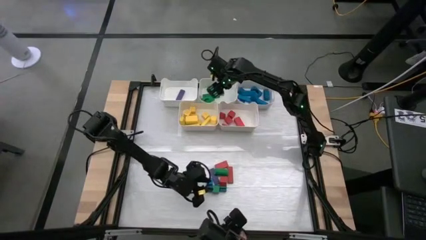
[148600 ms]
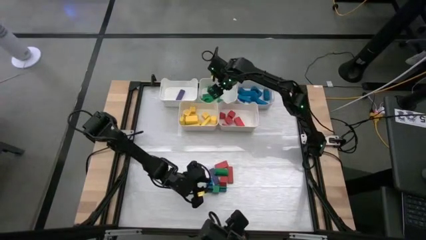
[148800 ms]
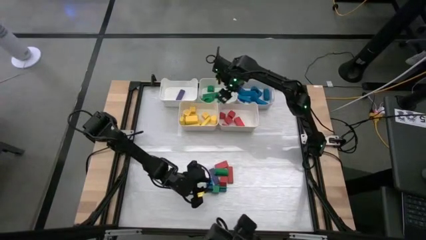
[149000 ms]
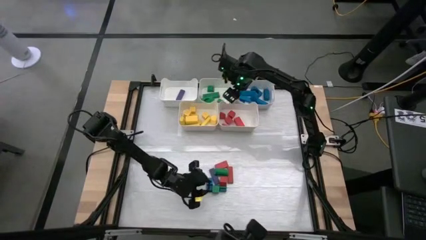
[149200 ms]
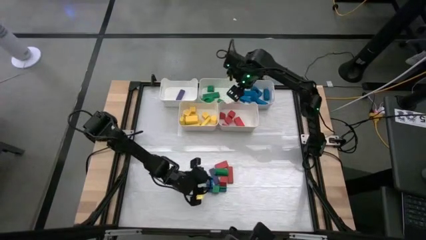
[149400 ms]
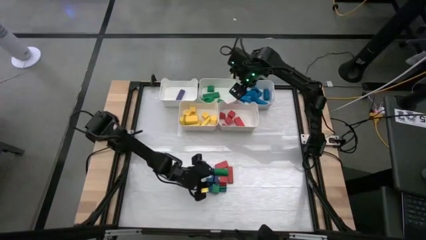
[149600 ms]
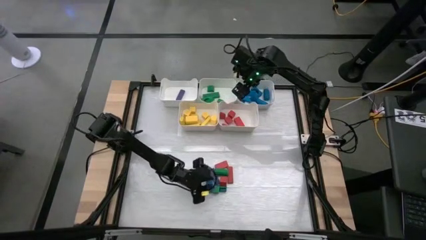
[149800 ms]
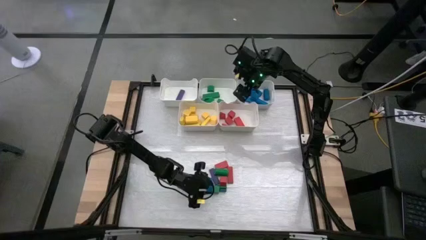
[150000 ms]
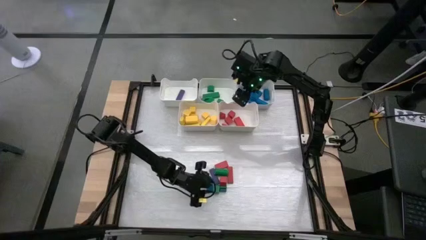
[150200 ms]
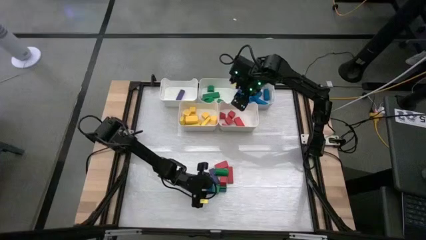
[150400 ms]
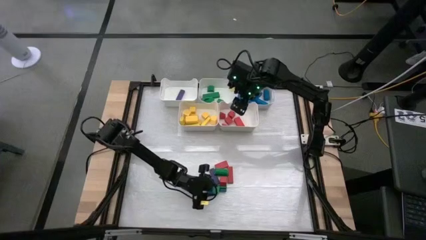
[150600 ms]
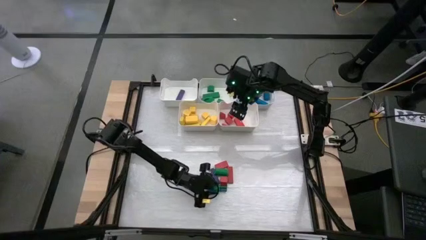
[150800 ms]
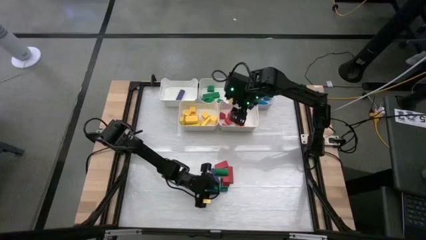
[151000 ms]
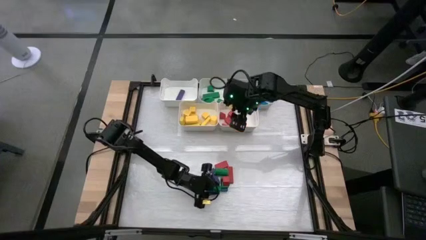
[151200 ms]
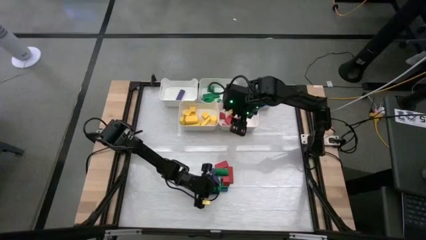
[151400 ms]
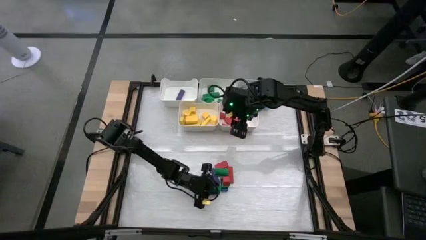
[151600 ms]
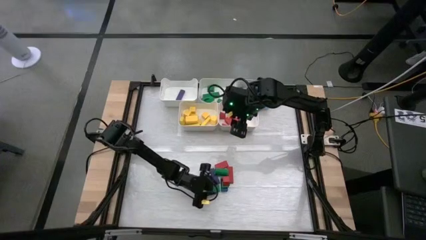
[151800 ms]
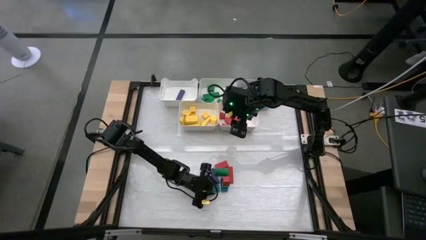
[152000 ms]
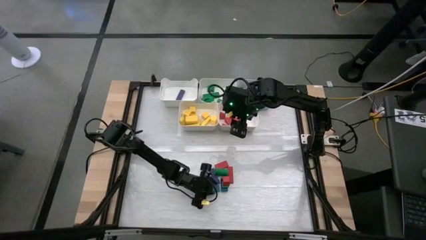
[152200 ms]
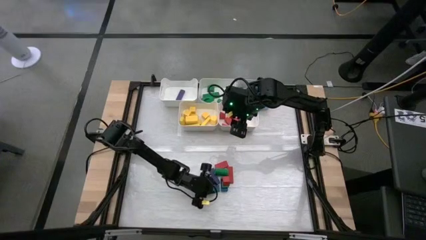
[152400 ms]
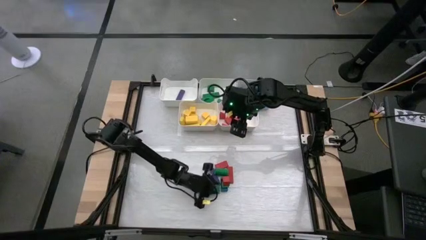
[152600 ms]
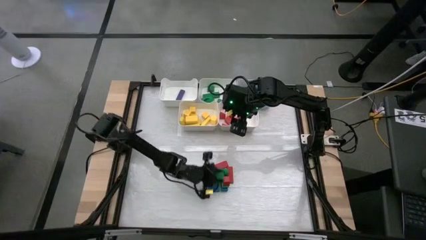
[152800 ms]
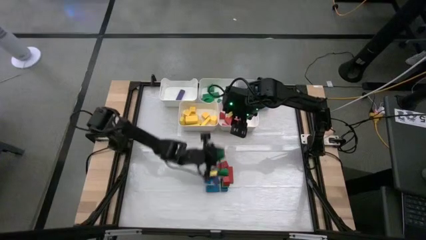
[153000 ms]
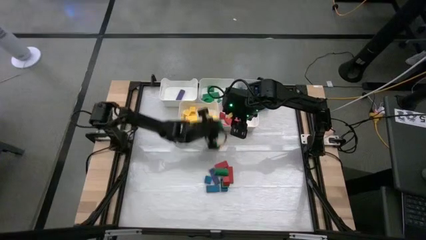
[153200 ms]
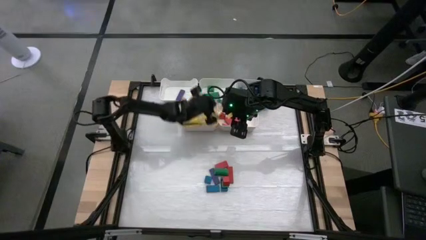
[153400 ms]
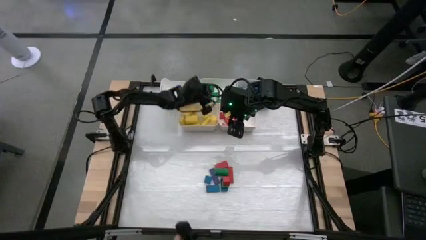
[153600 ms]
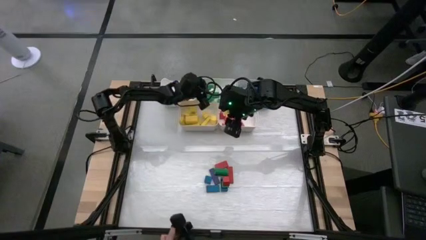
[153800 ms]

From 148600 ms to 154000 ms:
Task: Sort blocks
Put the green block into the top center bin

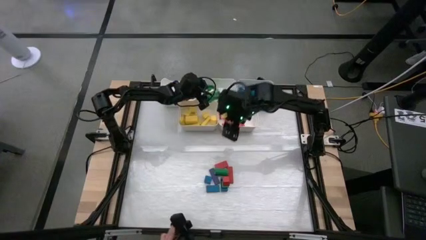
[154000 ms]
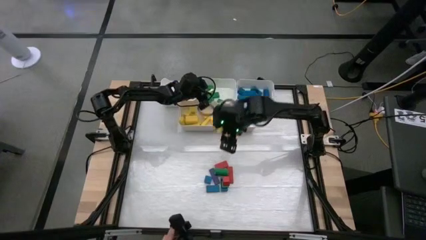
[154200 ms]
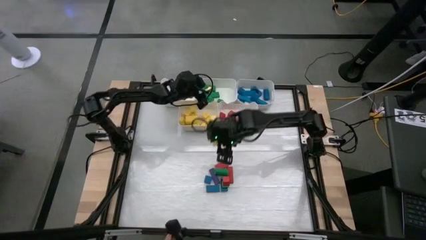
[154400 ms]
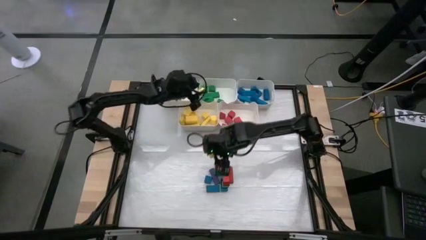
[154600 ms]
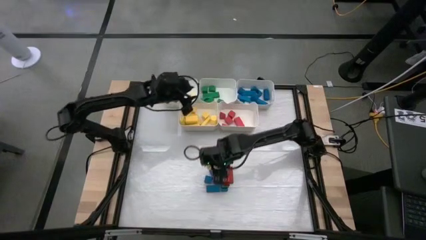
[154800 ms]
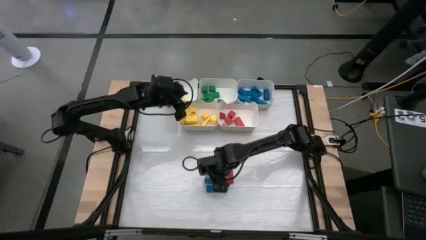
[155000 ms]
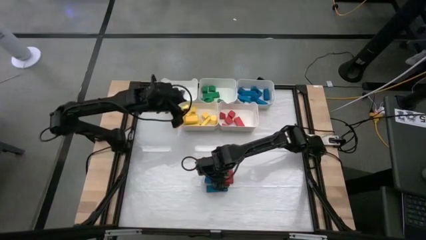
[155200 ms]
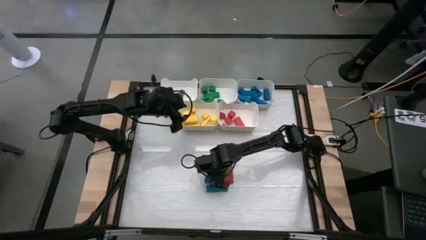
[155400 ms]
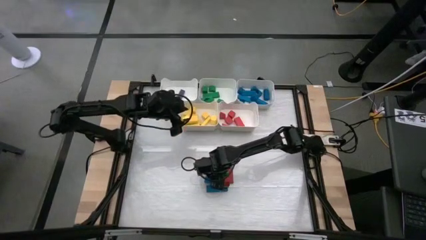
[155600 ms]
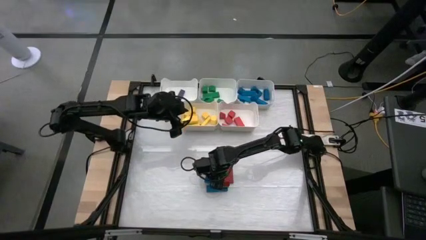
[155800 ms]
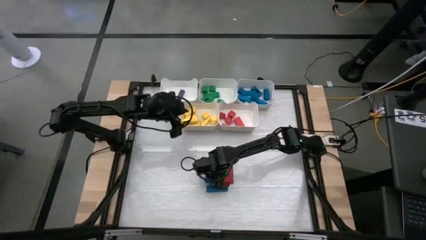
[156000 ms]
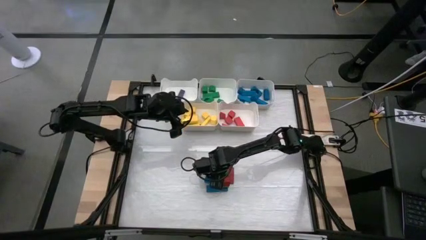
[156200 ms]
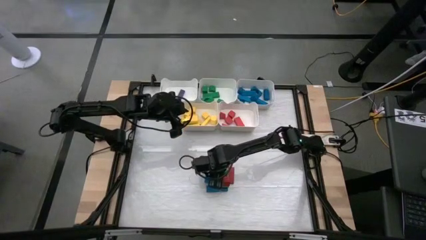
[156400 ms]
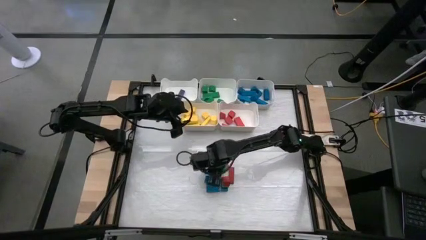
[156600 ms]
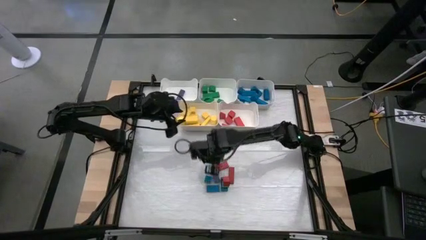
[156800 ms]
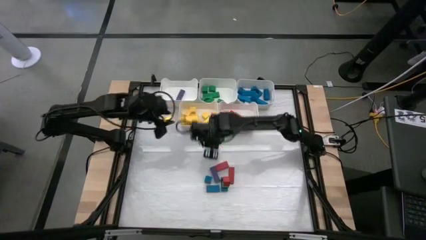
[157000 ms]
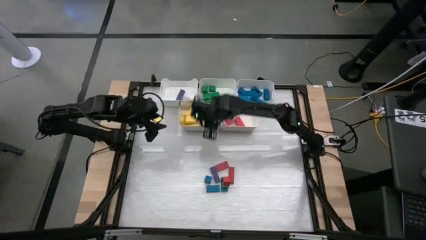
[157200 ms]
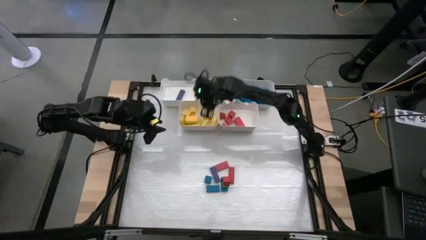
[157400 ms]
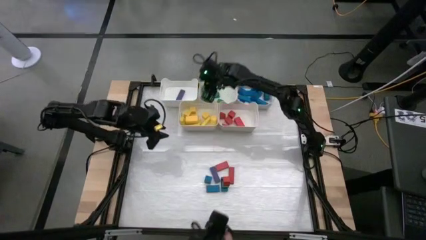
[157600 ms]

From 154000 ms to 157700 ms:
Put the green block into the top center bin

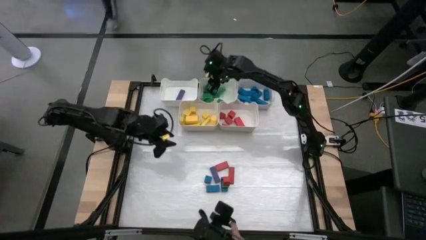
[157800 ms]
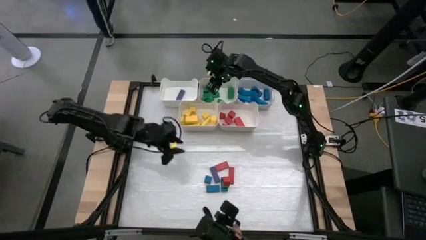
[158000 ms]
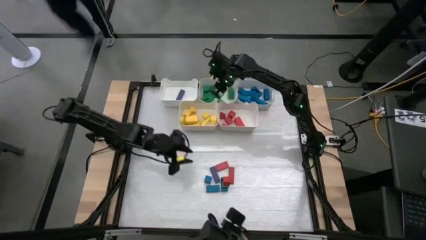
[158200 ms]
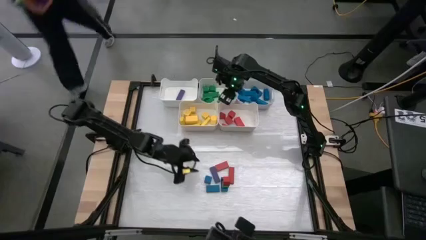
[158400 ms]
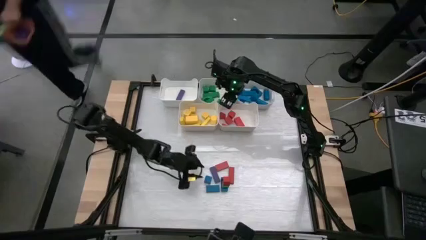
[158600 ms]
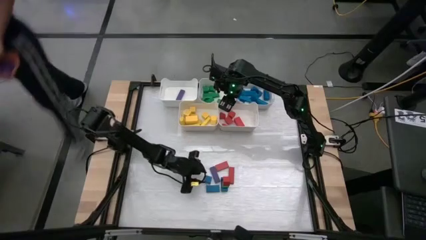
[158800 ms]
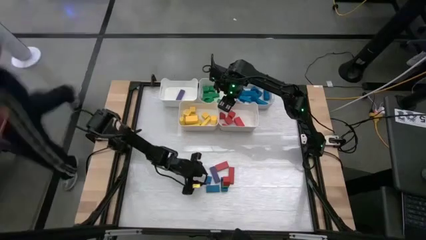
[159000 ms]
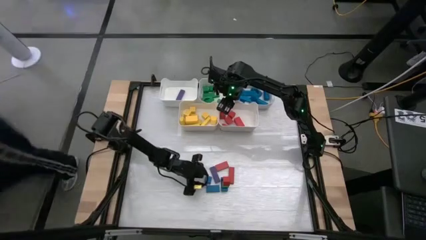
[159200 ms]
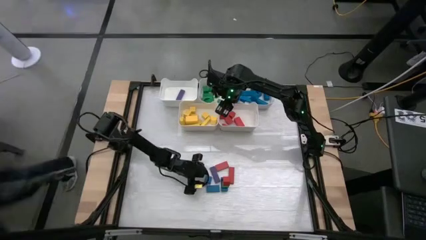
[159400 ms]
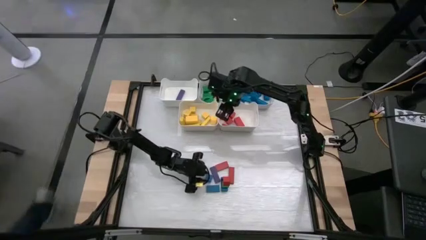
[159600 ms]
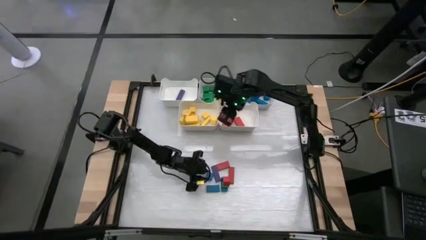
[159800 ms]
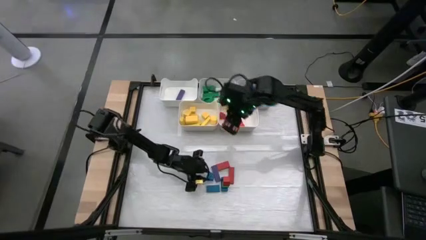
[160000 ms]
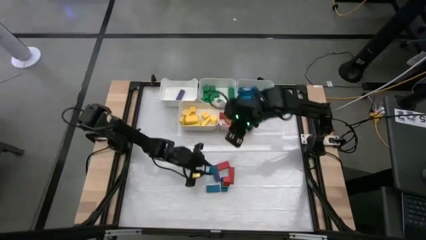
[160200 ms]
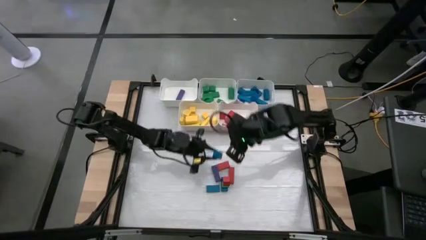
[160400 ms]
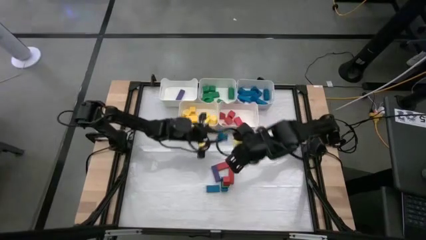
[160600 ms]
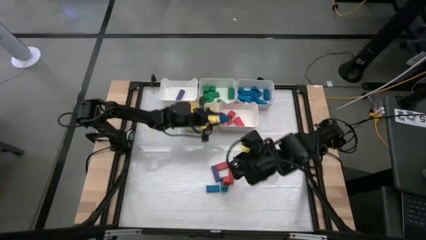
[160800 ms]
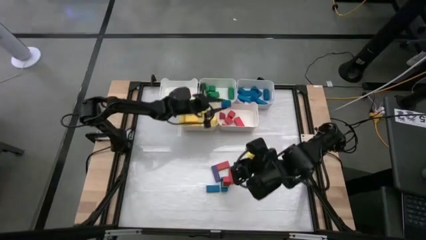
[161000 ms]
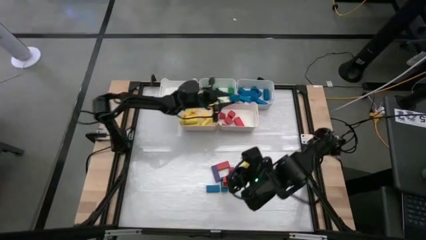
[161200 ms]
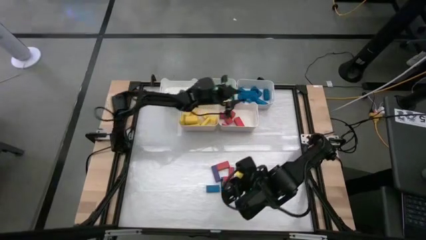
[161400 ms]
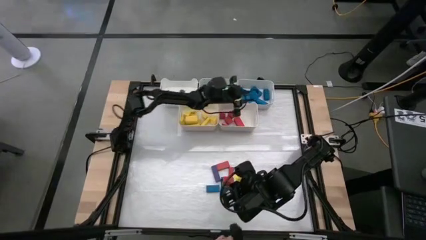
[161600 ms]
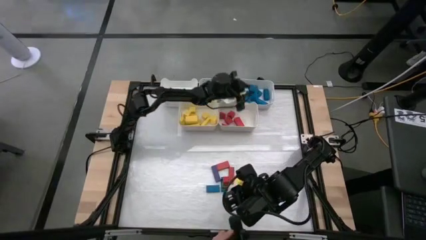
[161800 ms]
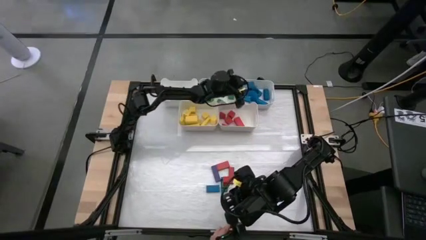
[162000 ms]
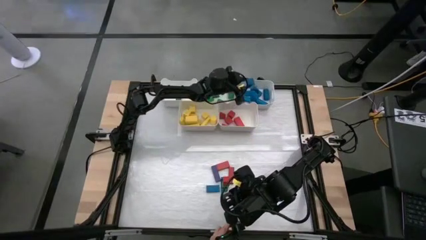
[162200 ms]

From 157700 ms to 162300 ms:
Put the blue block into the top right bin

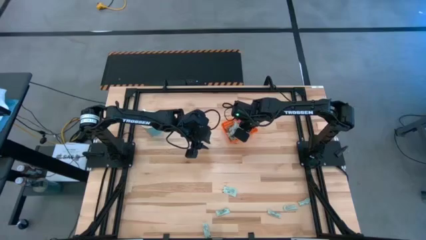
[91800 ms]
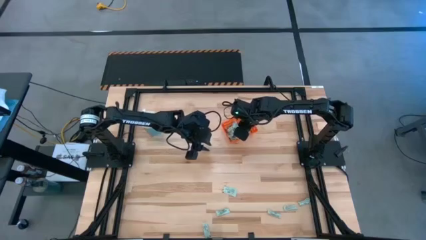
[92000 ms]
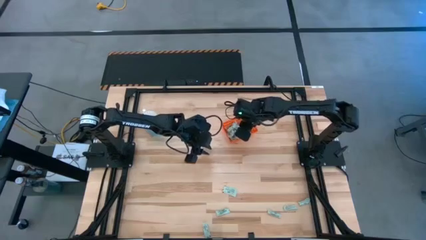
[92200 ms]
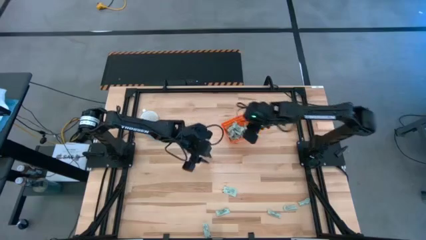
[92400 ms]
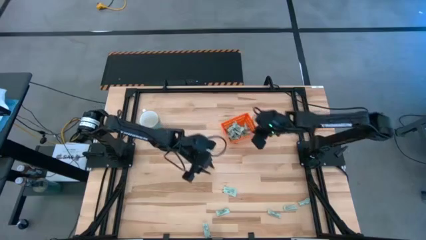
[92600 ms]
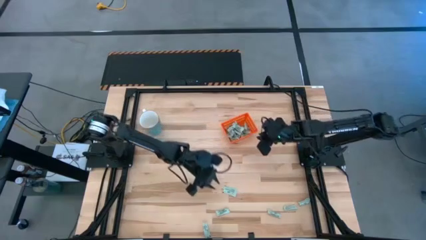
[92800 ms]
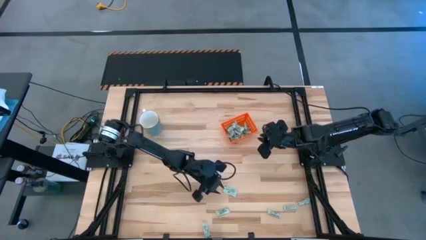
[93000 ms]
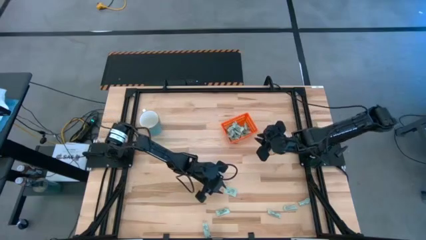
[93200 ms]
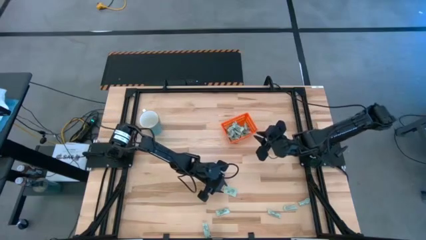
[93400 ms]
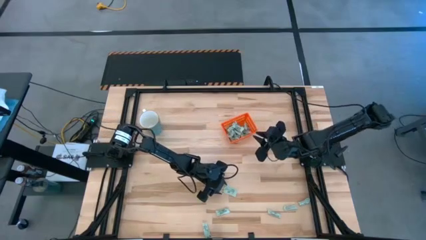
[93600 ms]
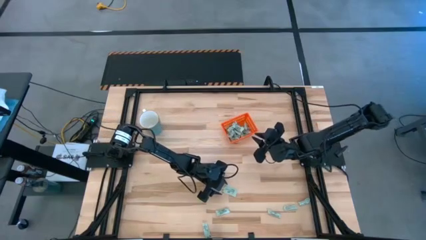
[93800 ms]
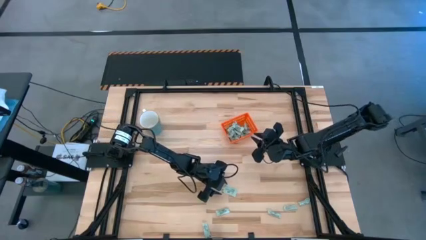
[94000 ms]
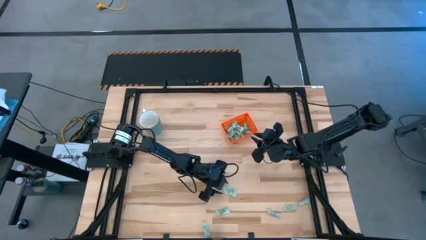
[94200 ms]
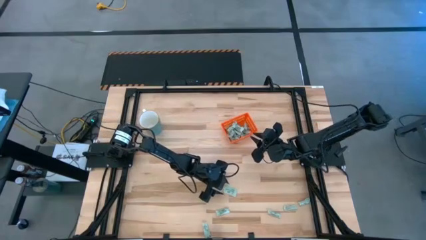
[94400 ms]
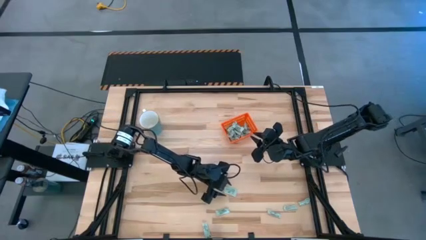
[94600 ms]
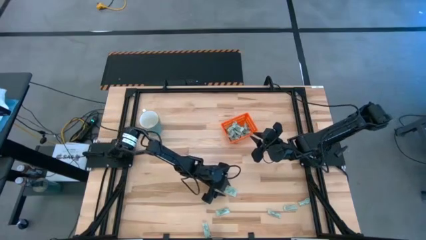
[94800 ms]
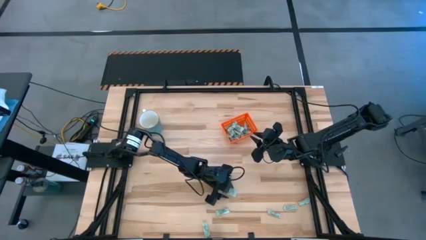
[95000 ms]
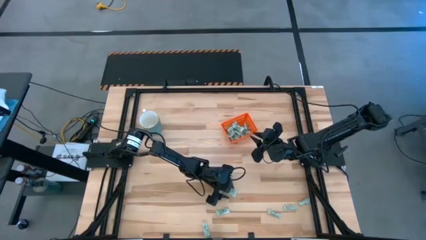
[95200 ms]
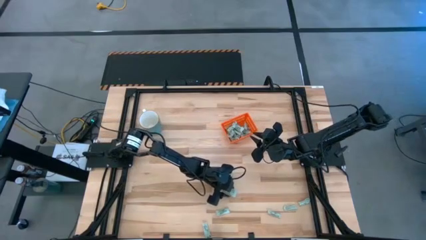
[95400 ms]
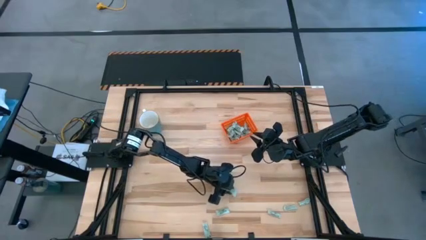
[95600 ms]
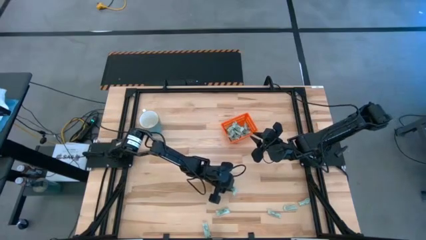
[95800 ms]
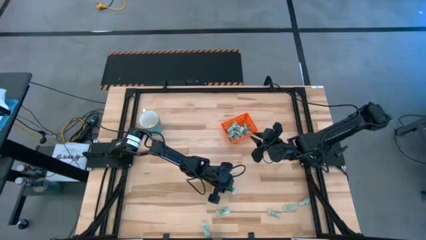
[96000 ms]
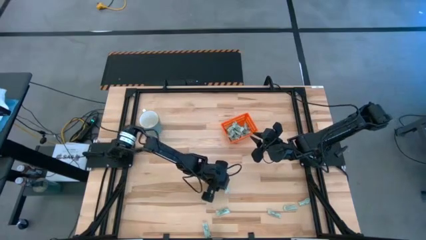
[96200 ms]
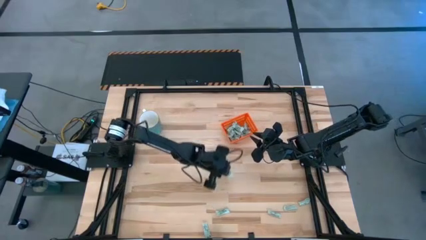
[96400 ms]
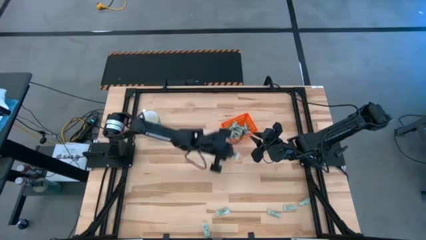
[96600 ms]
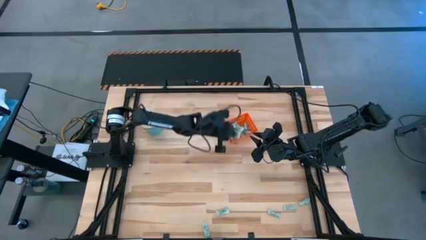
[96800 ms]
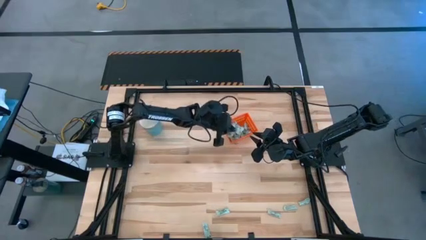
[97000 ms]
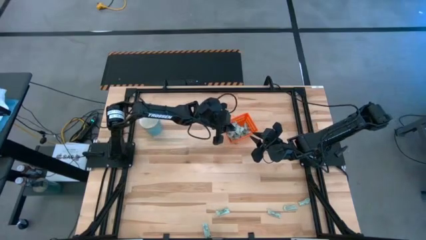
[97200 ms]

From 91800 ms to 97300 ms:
Task: Pick and place Stevia / Truvia into bins
Put the stevia packet into the orange bin
